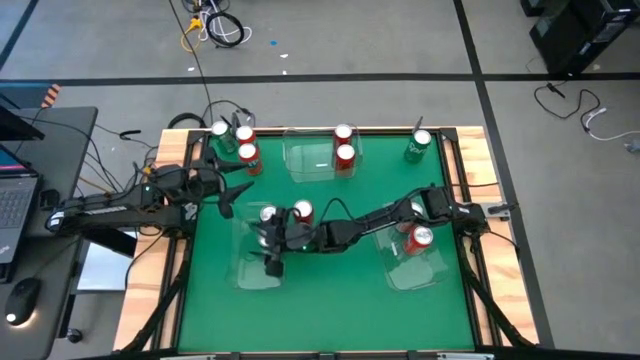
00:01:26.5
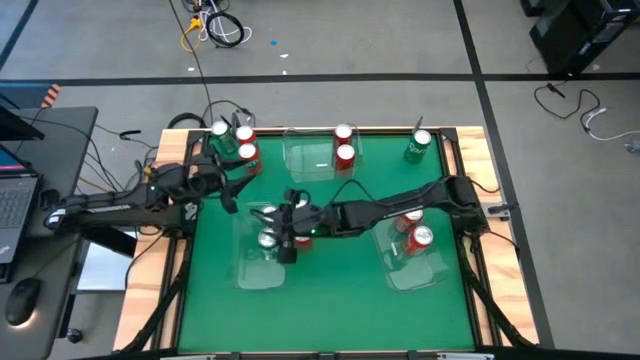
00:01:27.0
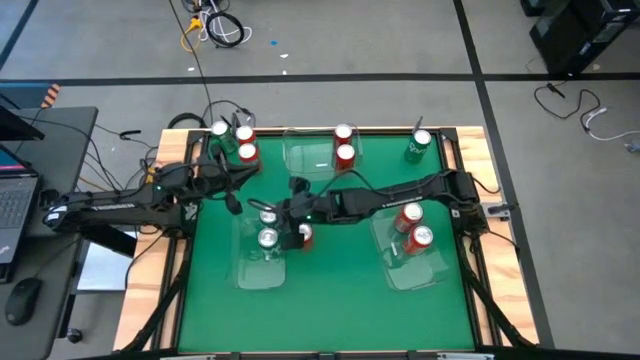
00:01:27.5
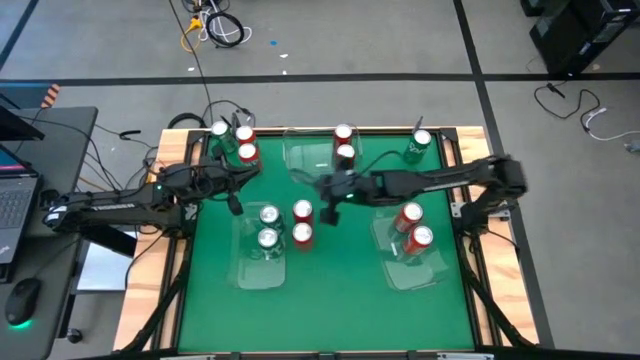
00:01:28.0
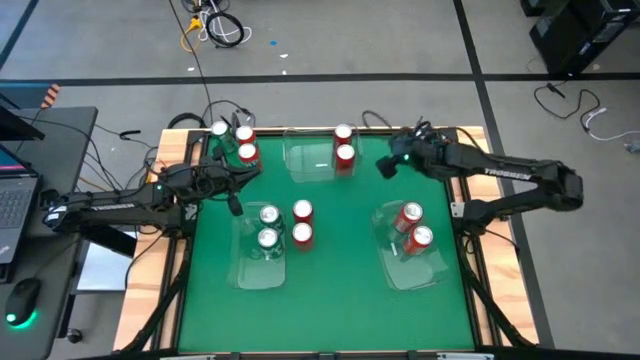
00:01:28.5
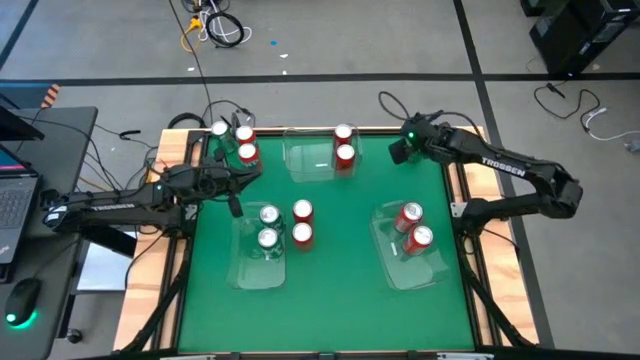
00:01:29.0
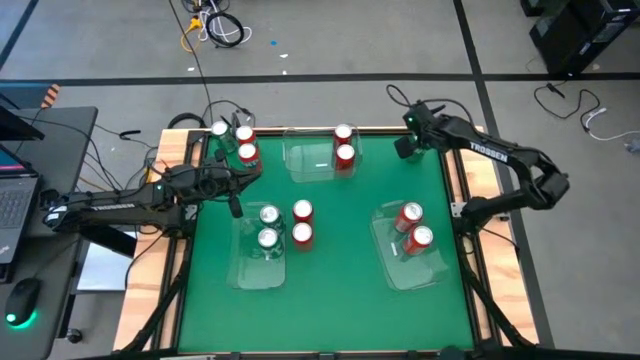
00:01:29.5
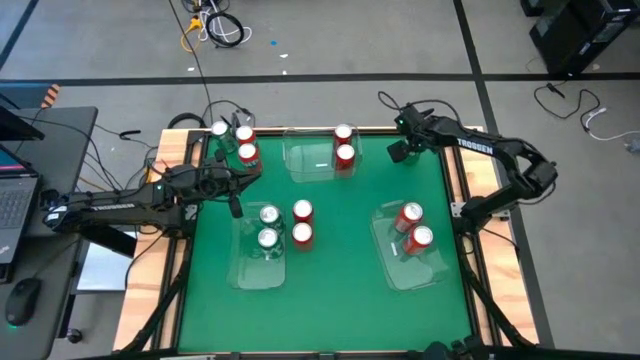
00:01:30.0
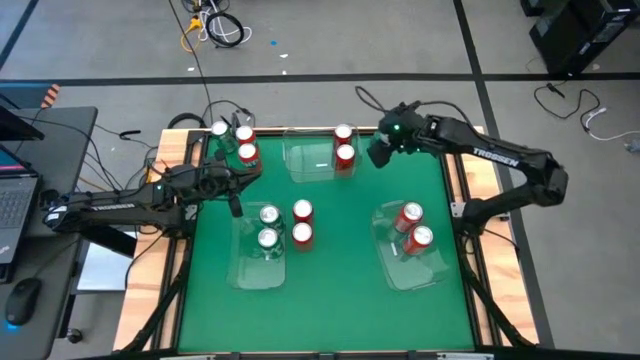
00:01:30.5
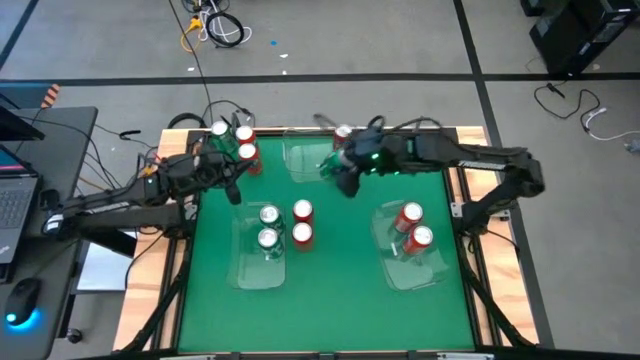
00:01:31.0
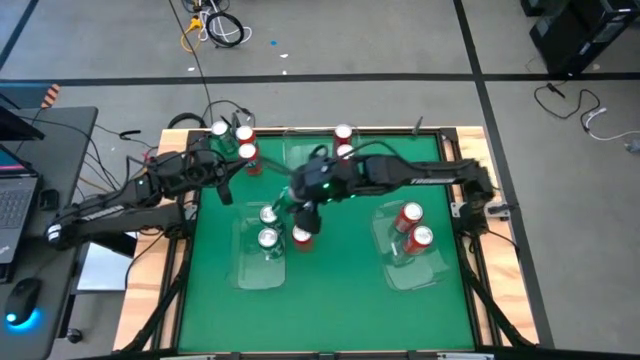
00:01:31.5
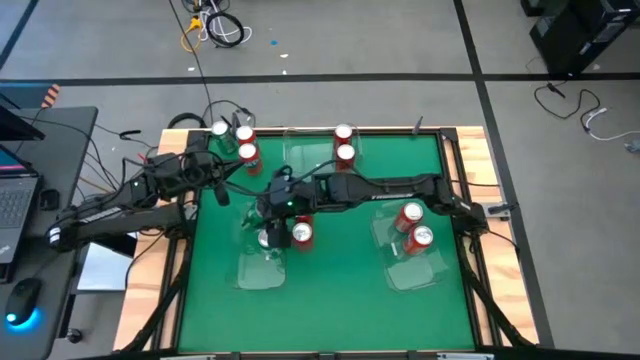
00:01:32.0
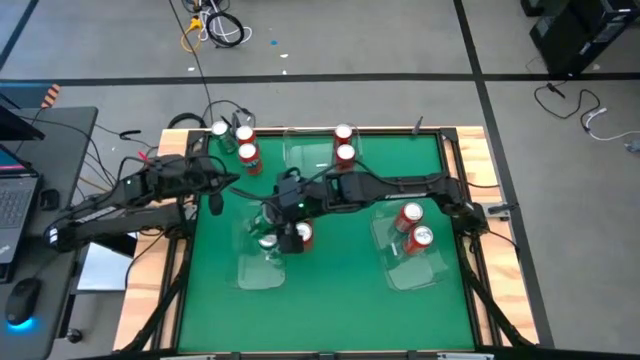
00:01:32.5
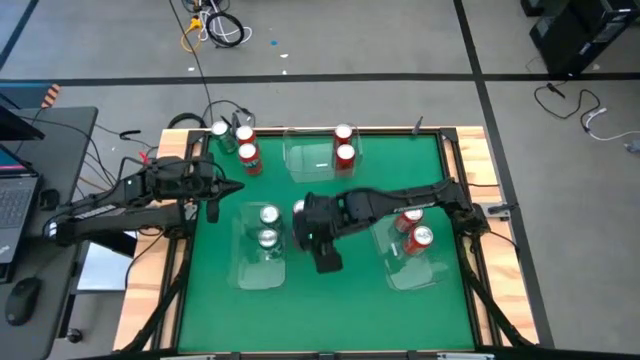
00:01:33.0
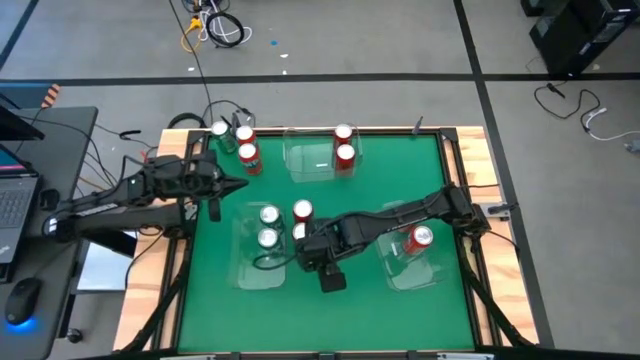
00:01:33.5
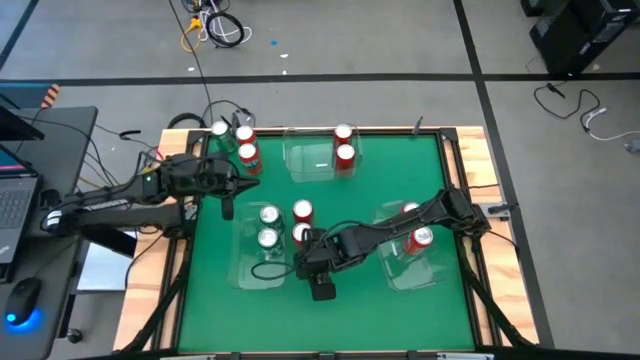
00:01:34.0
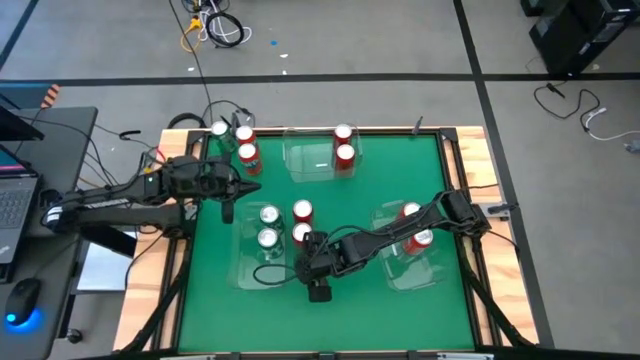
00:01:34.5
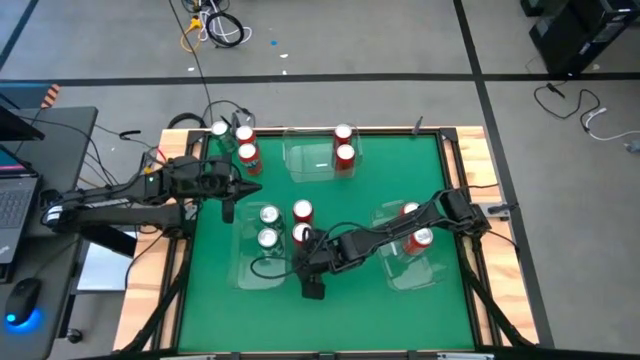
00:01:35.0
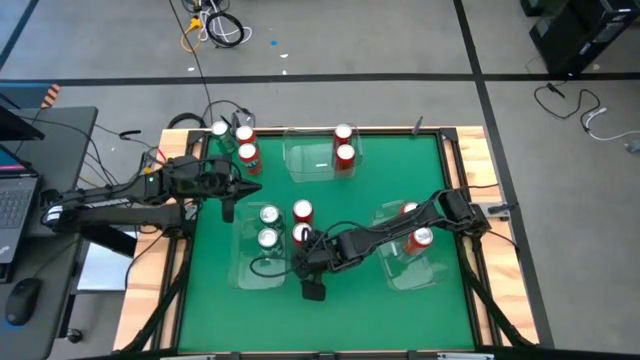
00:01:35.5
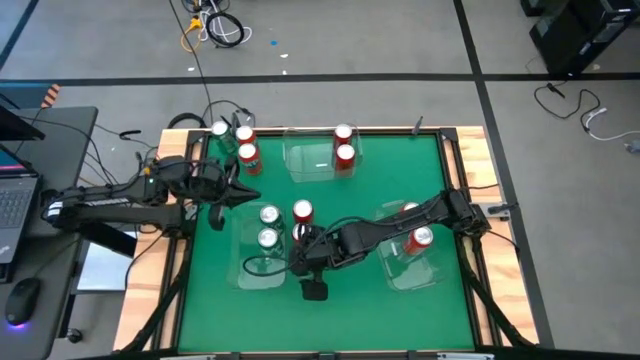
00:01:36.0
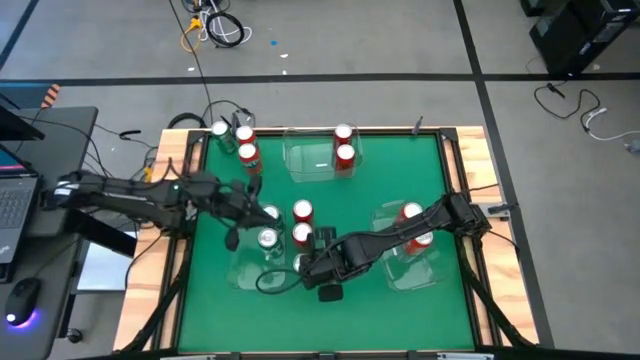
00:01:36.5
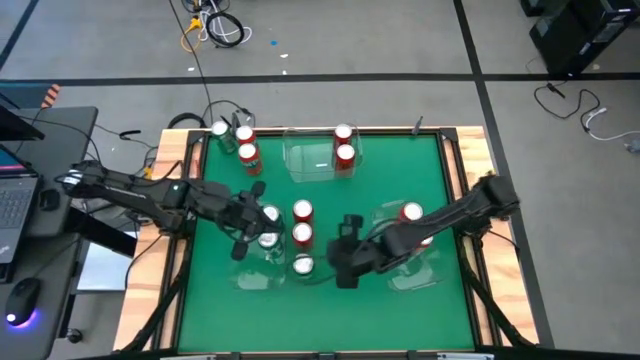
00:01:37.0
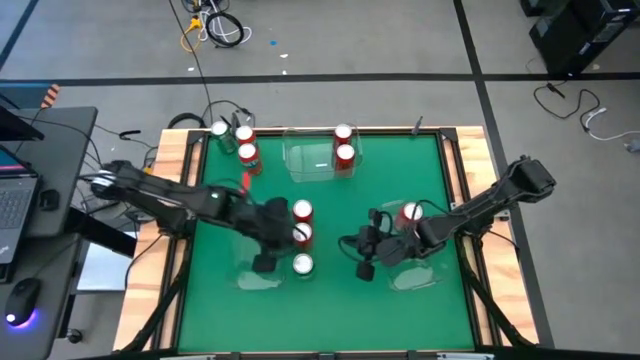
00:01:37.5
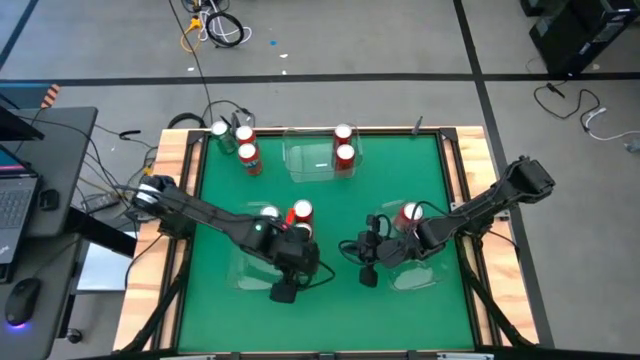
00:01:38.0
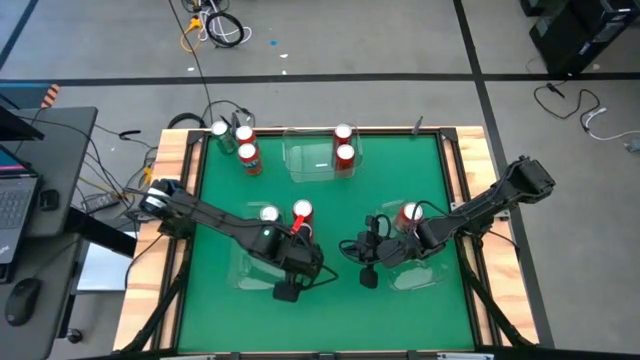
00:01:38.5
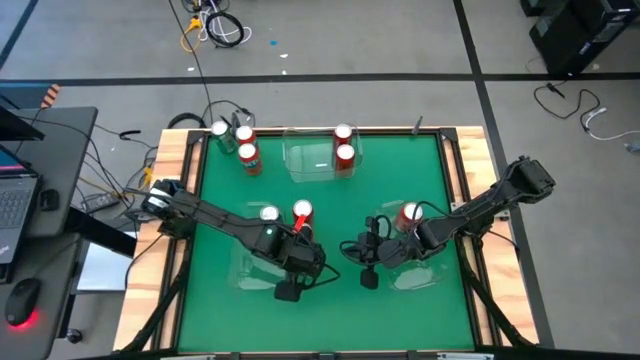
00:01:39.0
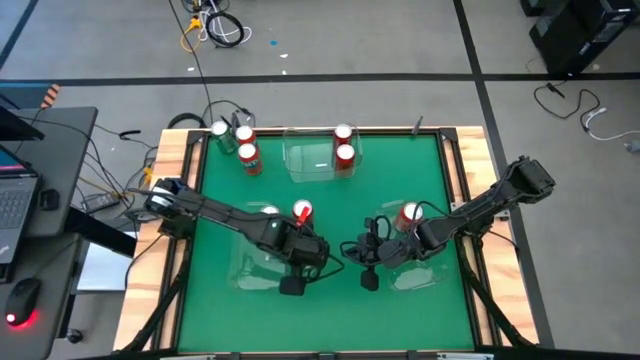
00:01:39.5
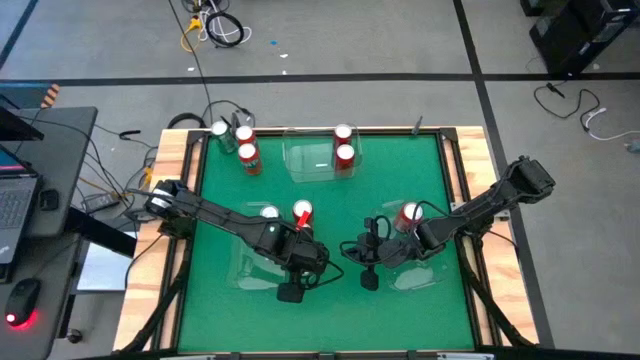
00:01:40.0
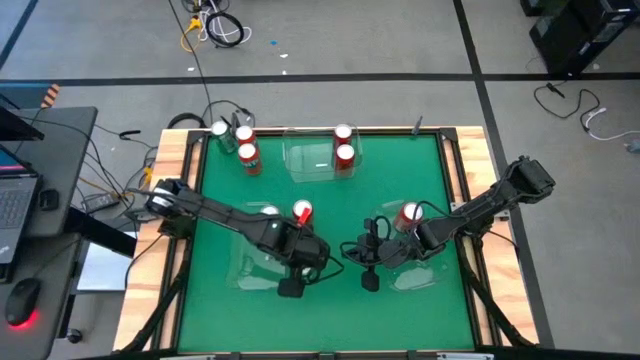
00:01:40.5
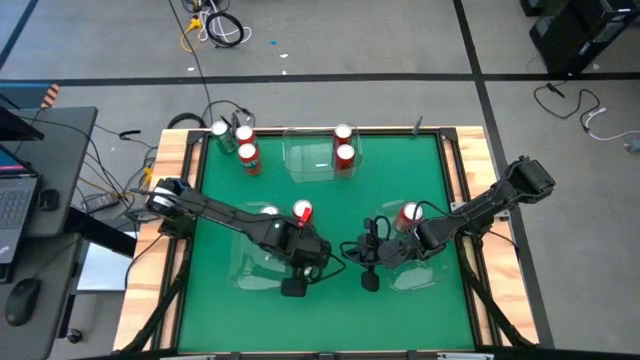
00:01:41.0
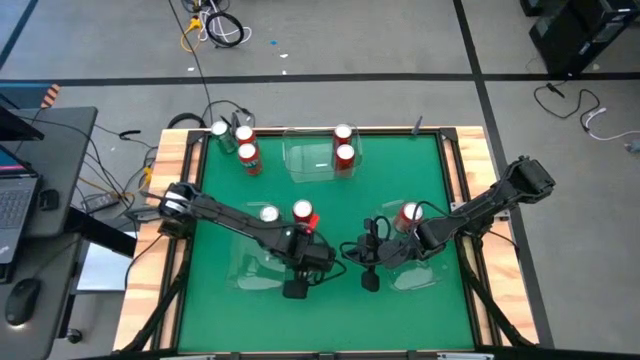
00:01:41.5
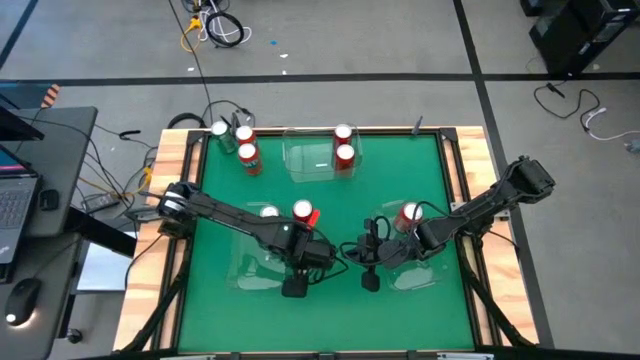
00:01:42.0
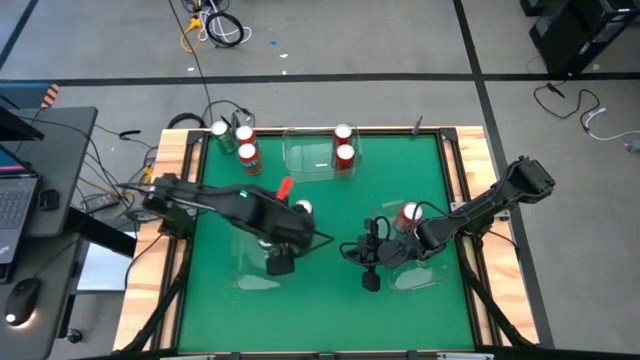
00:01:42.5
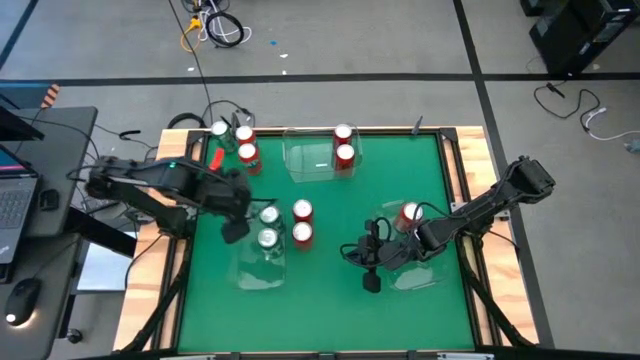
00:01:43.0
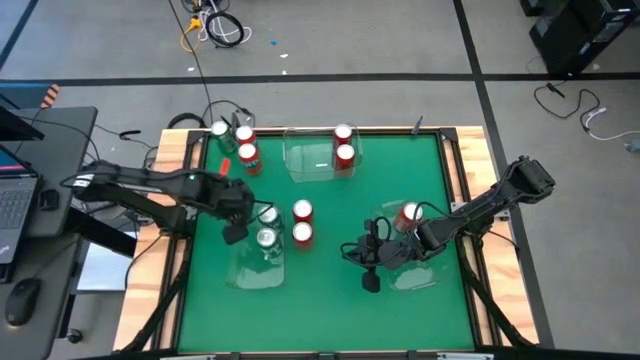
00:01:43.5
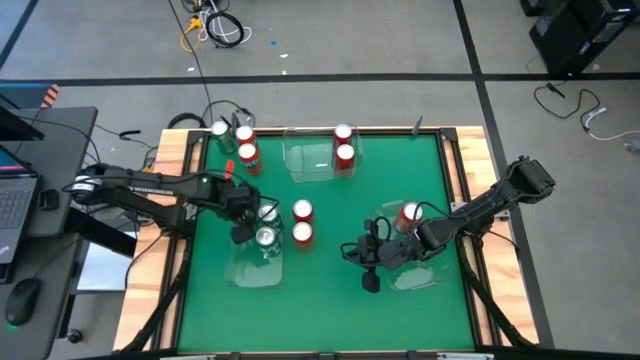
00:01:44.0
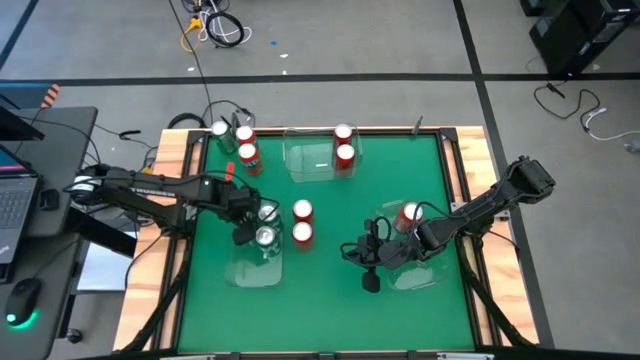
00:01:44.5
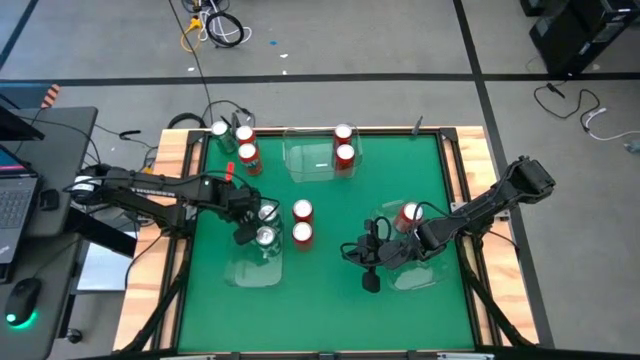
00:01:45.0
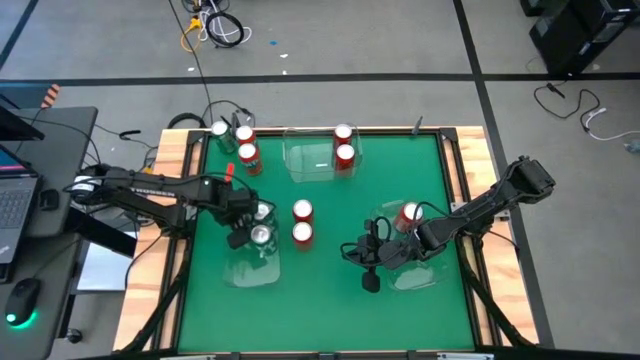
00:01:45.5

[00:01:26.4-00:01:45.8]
Task: Sort soda cans
Put the green soda can into the middle left transparent bin
